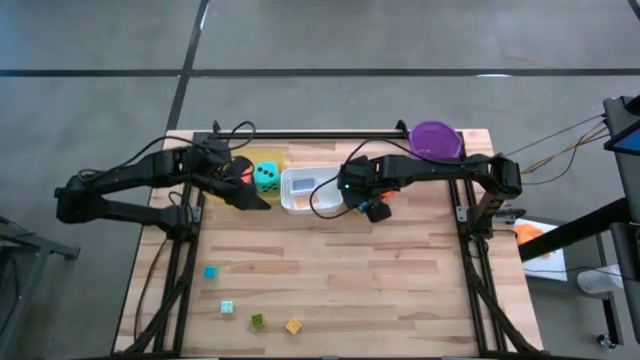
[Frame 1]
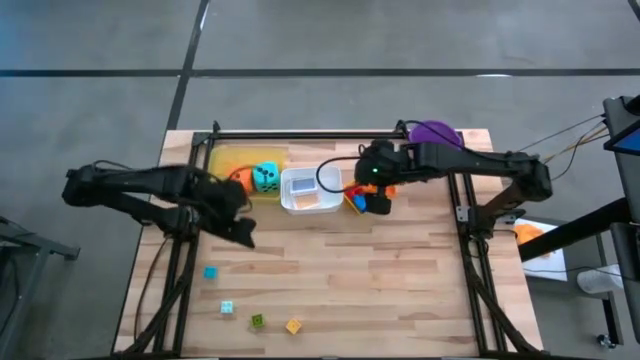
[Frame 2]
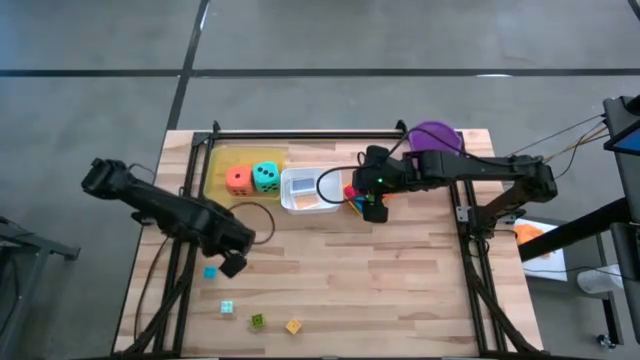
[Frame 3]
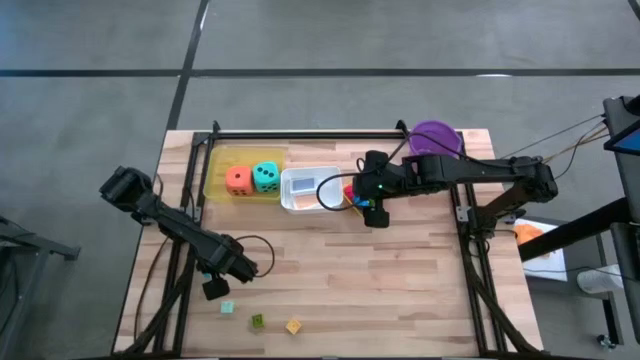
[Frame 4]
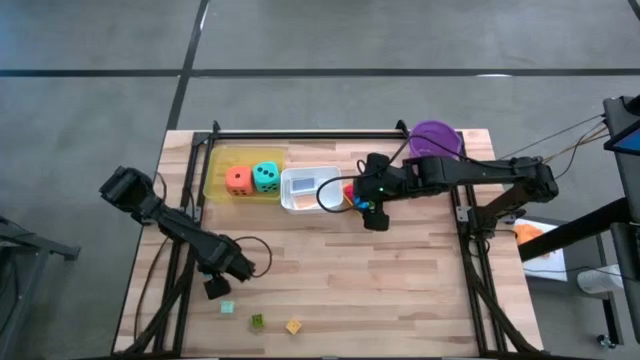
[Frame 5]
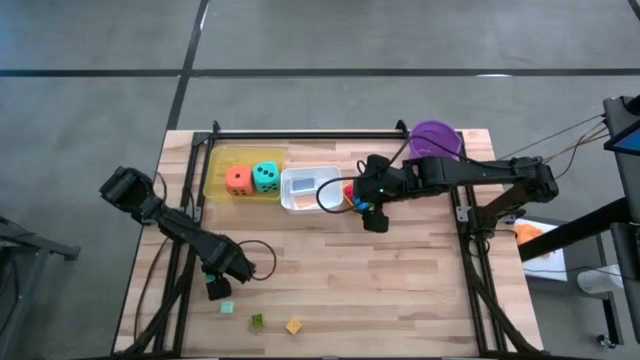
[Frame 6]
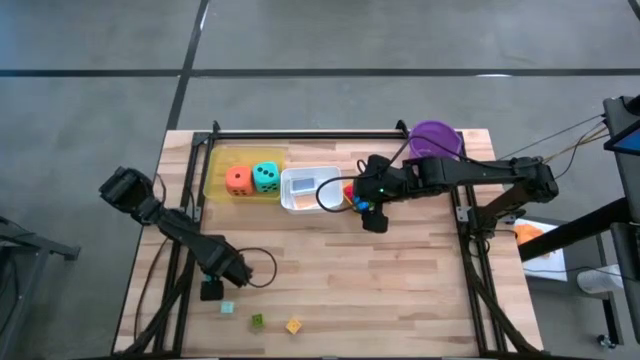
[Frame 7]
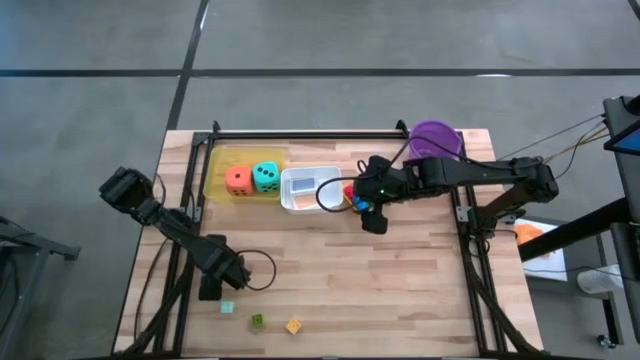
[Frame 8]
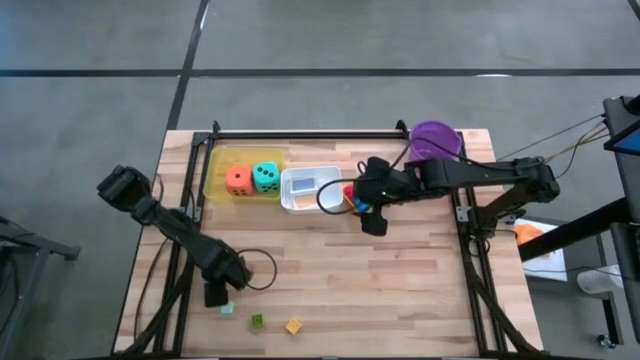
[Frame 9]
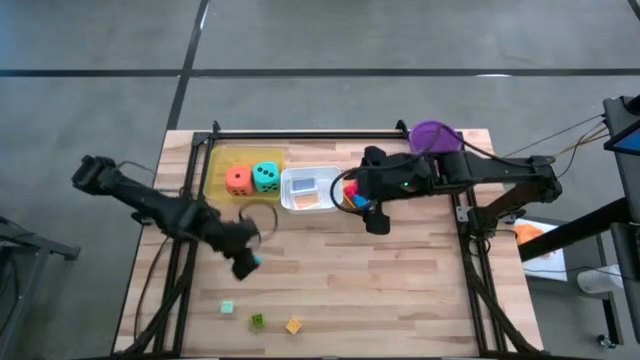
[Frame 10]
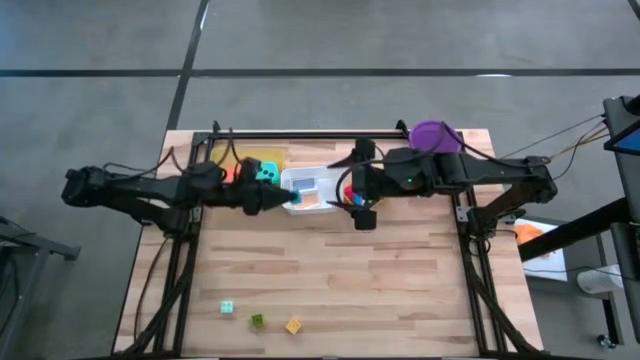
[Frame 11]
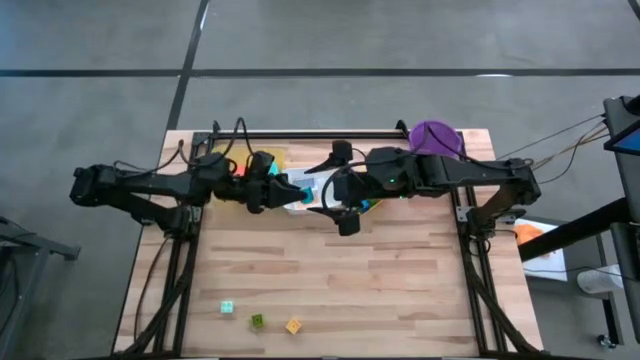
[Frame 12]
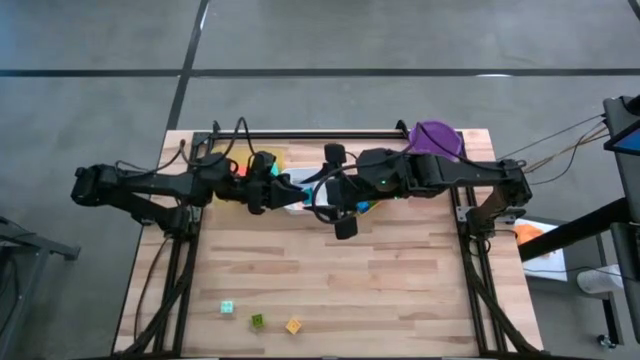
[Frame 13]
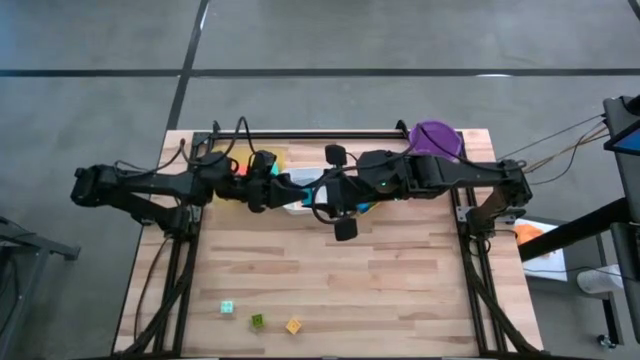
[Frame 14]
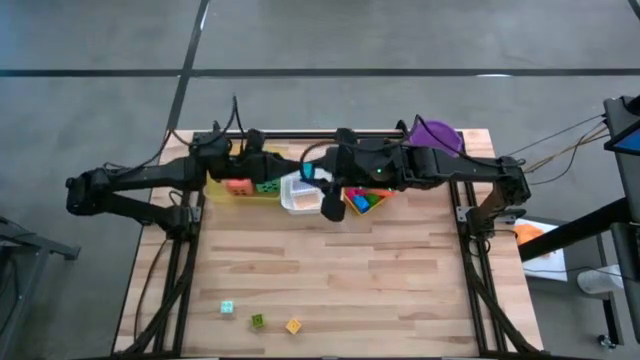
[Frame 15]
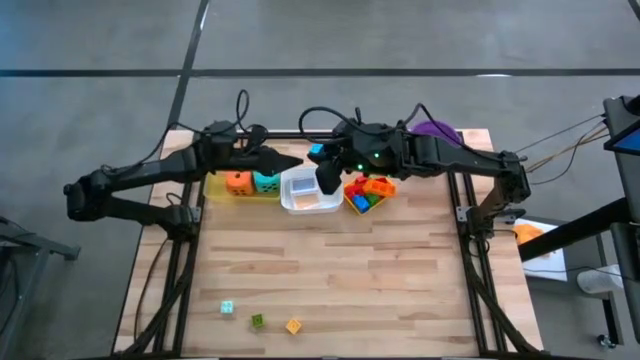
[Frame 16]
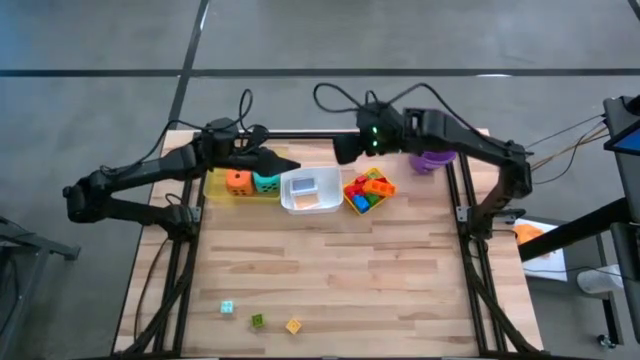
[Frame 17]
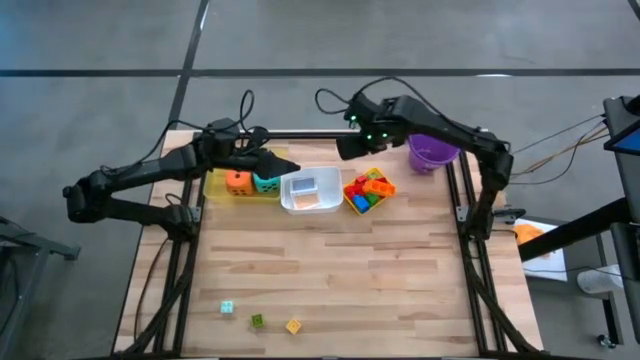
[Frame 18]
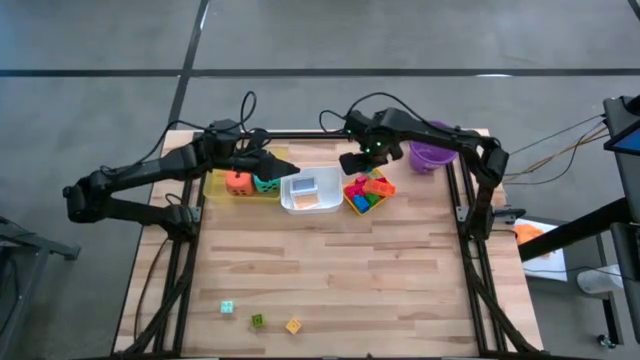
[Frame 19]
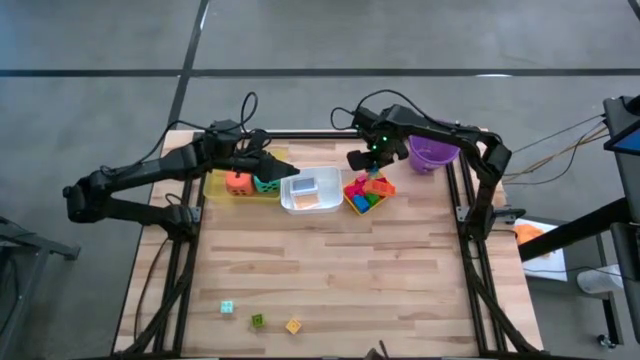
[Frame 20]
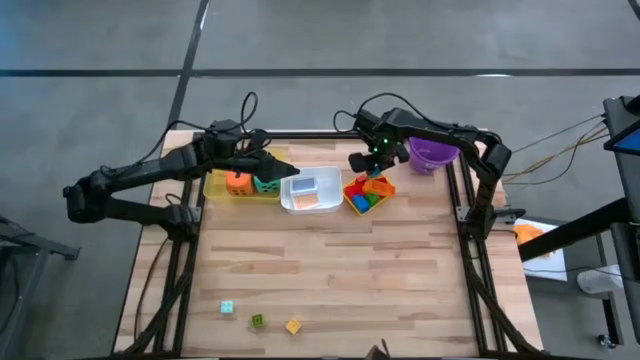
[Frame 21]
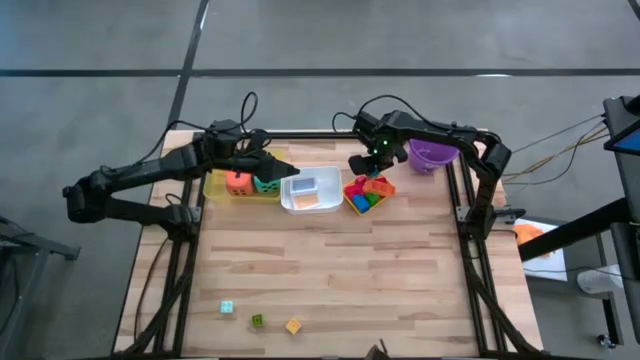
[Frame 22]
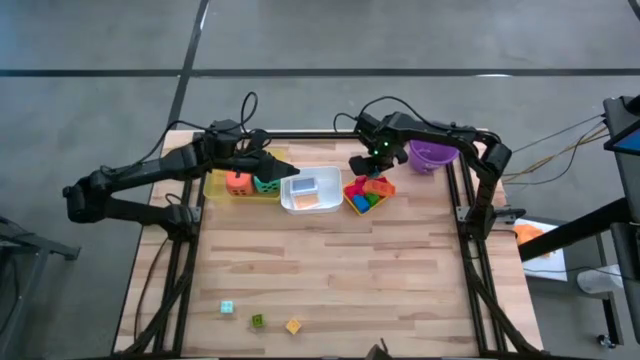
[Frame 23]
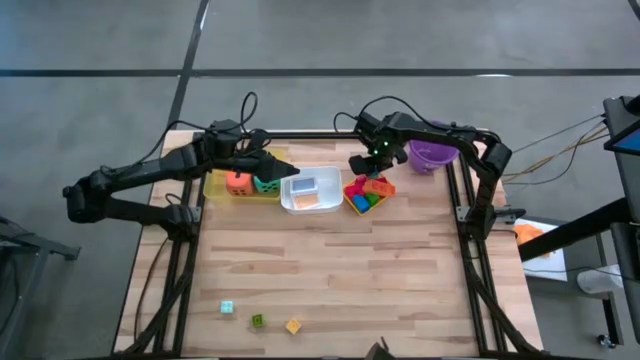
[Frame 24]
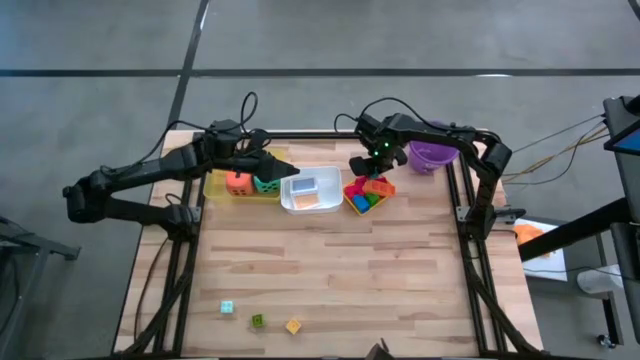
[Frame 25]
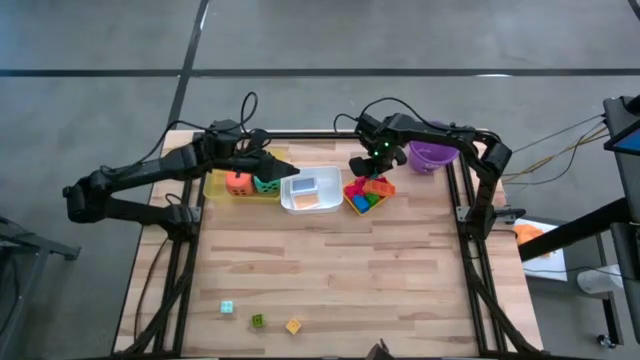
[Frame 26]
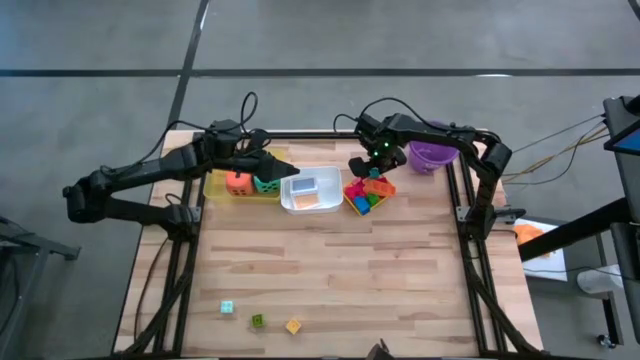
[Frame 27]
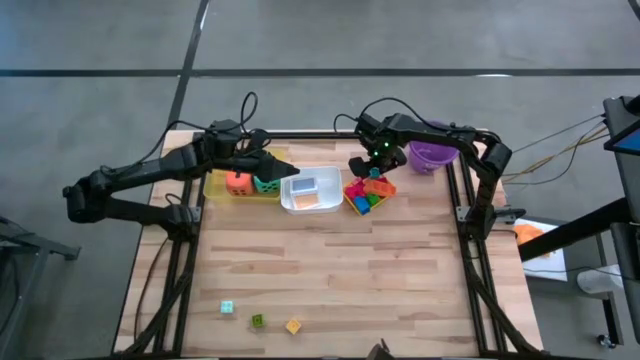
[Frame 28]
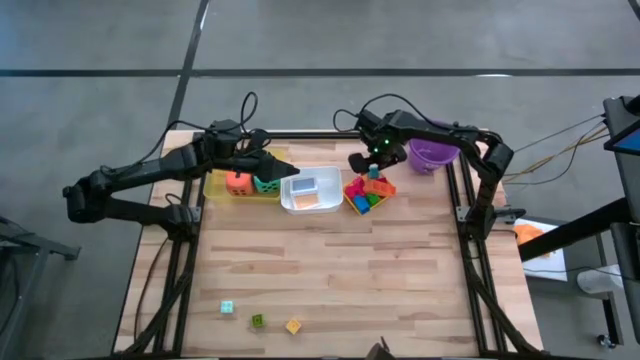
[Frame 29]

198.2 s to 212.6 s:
Task: Pick & Place Toys
Put the blue game piece into the yellow bin

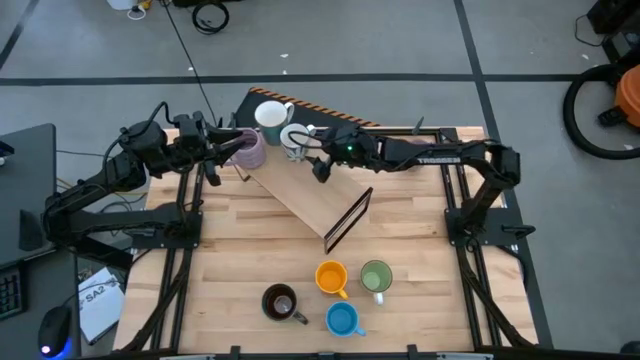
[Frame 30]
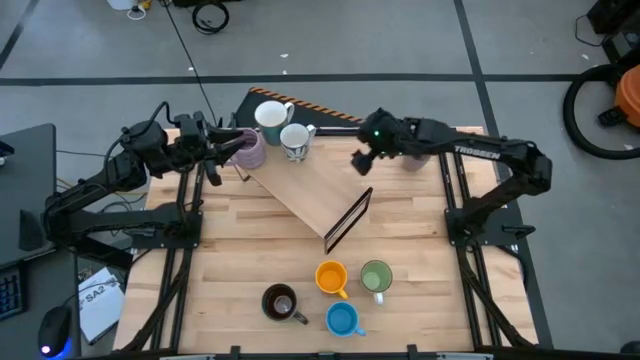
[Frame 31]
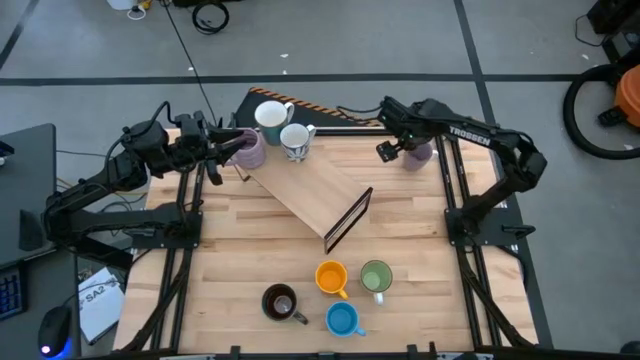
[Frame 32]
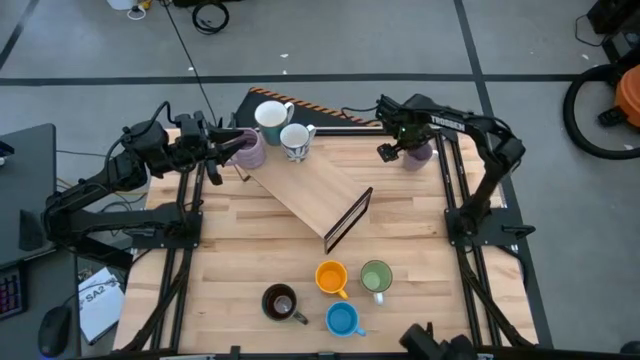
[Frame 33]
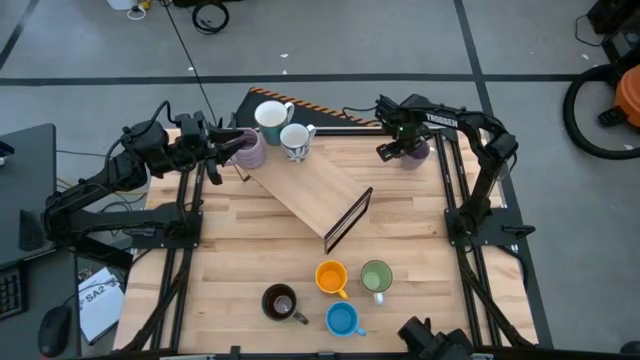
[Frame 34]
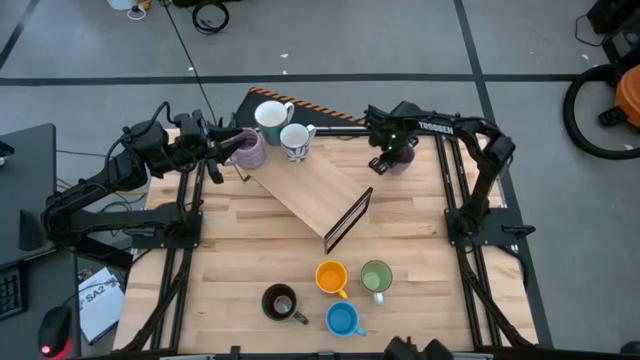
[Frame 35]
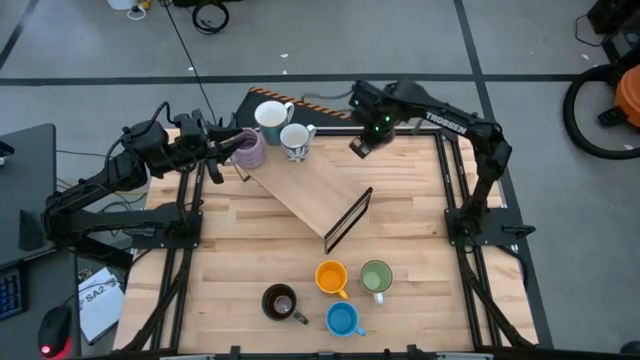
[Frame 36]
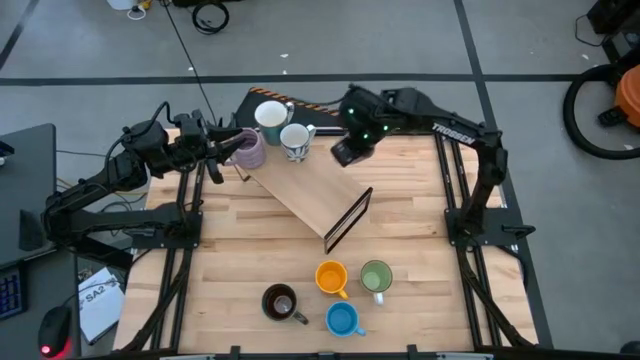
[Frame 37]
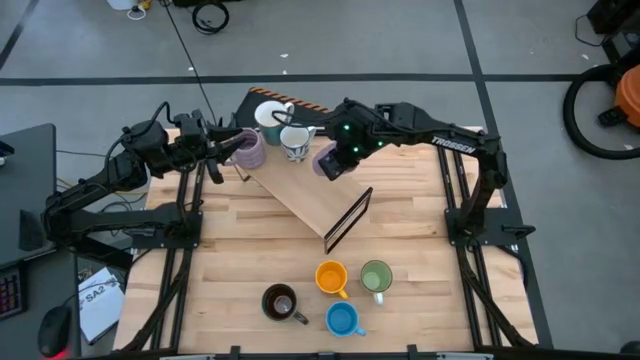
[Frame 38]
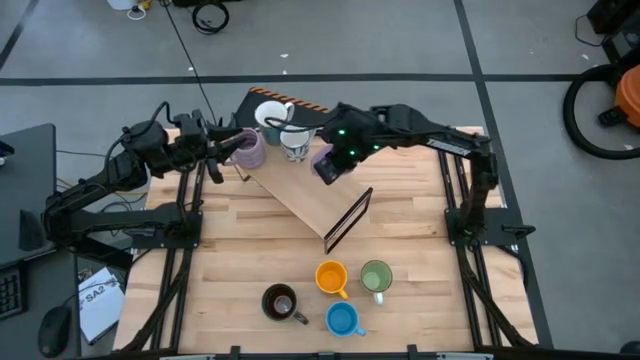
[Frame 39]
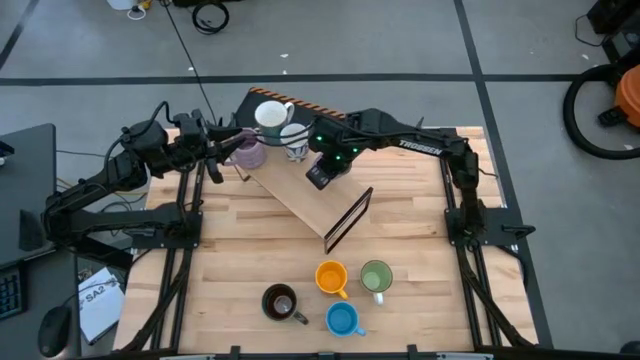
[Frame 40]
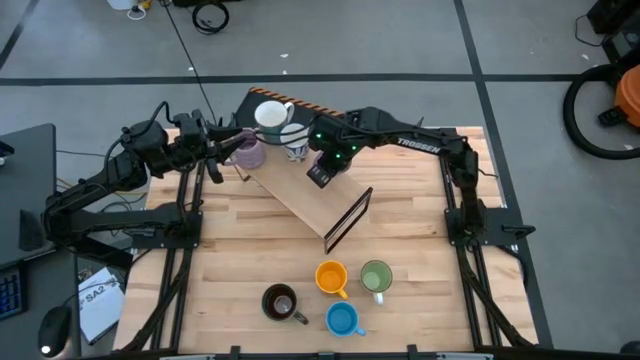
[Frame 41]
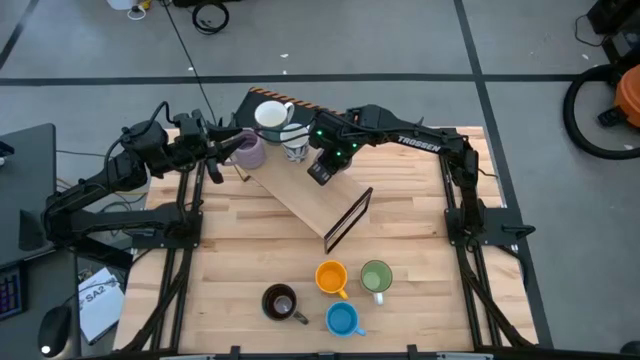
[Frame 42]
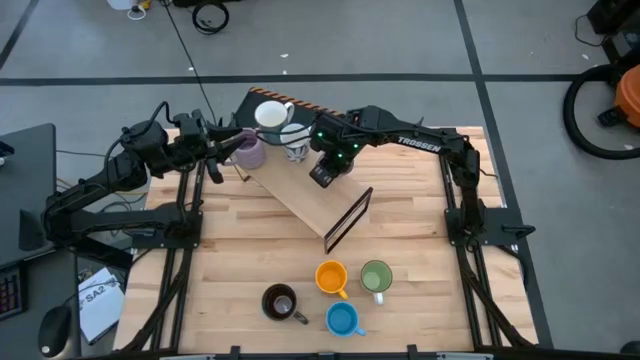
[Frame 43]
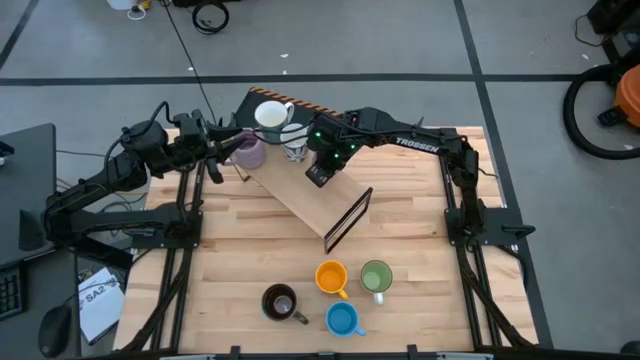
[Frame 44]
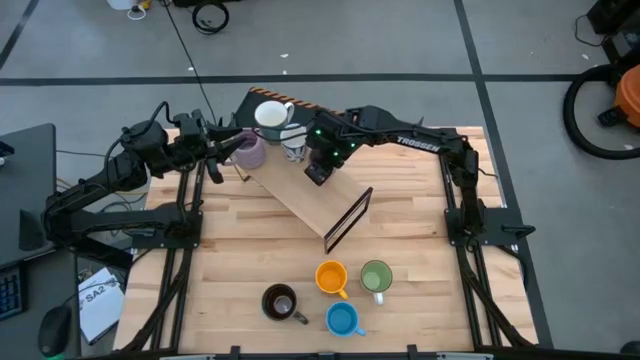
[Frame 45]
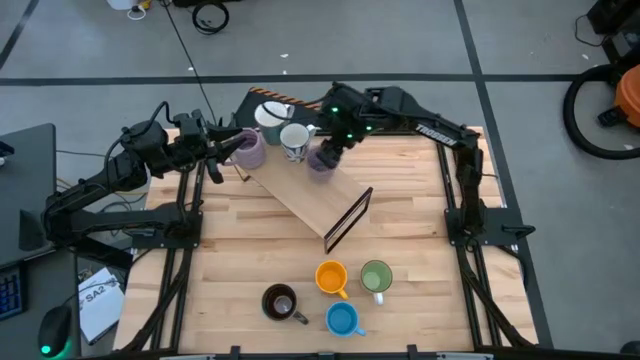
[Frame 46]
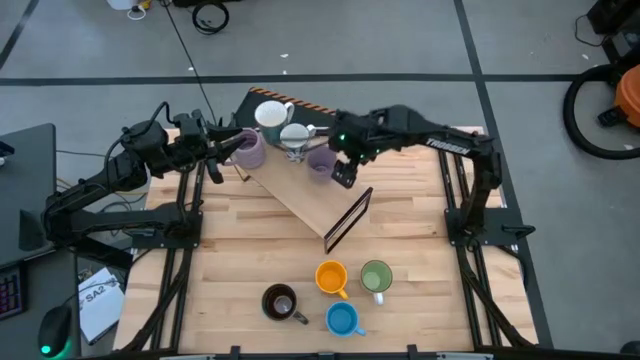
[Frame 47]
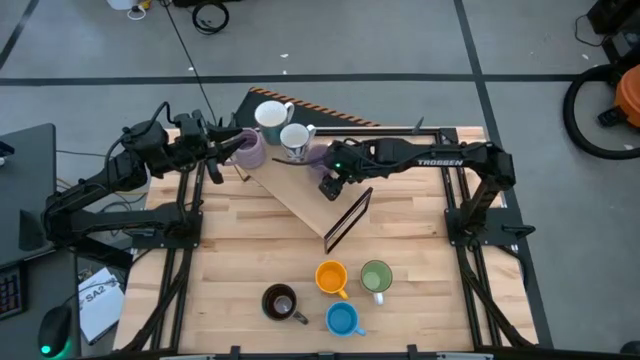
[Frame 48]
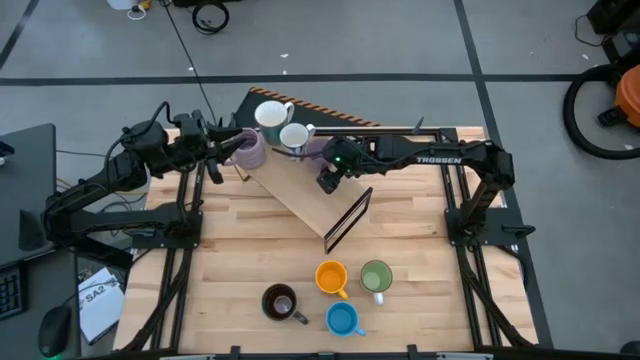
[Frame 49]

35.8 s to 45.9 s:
Task: Place coffee mugs
Put the purple patterned mug on the shelf
